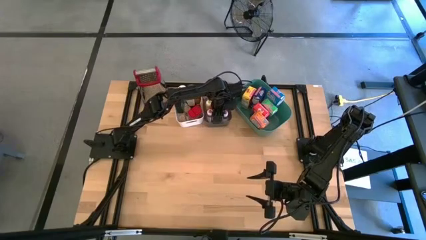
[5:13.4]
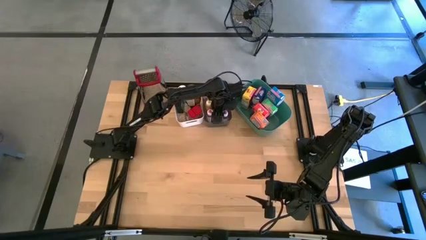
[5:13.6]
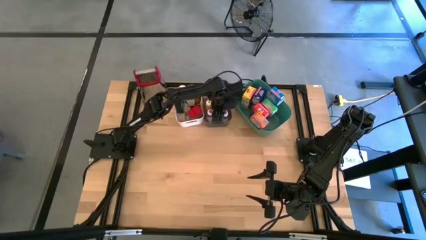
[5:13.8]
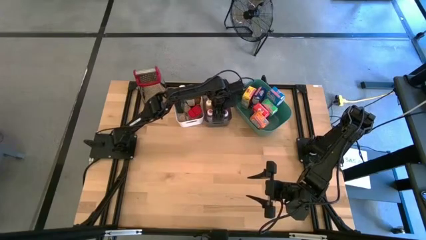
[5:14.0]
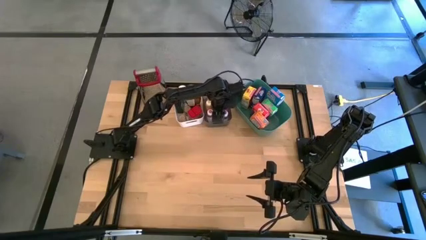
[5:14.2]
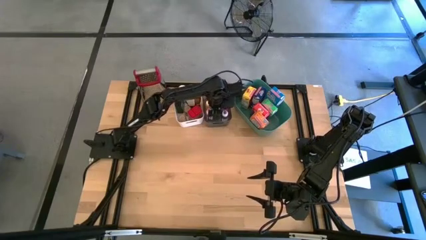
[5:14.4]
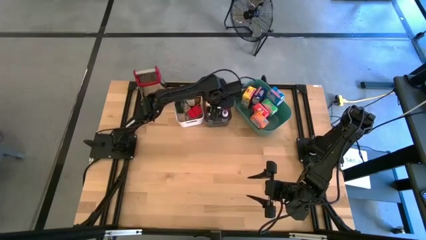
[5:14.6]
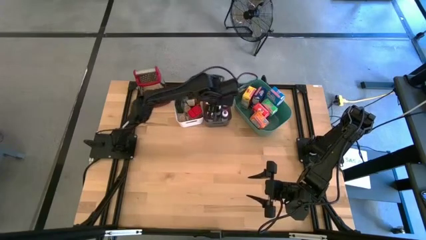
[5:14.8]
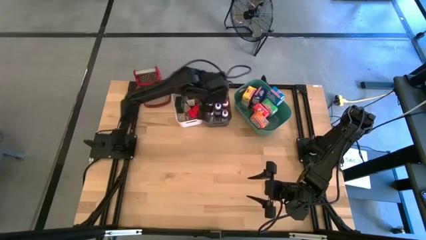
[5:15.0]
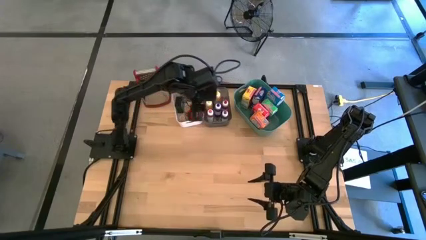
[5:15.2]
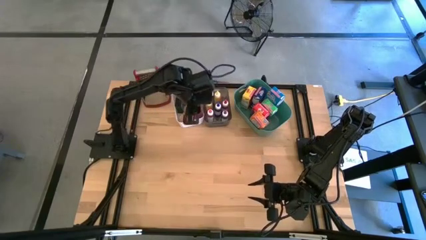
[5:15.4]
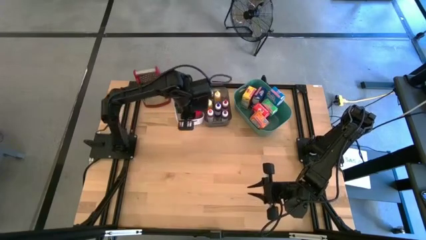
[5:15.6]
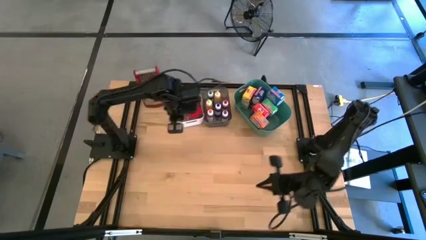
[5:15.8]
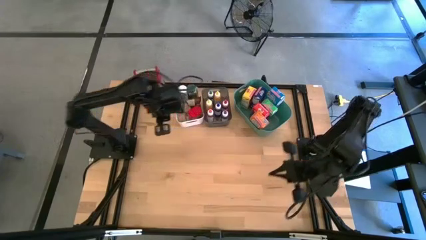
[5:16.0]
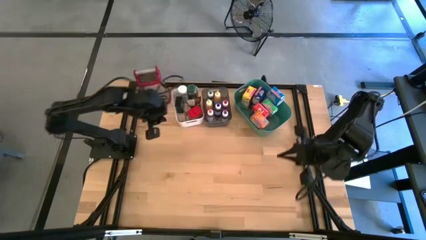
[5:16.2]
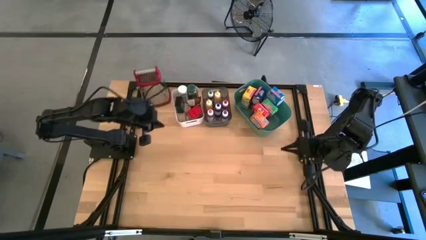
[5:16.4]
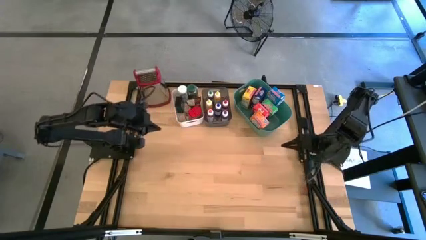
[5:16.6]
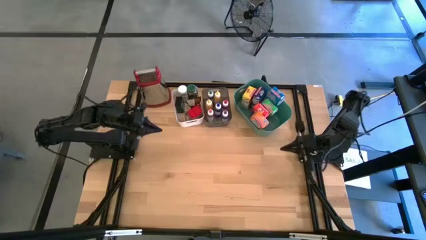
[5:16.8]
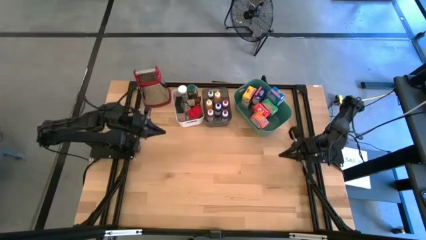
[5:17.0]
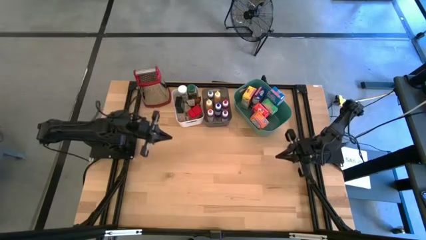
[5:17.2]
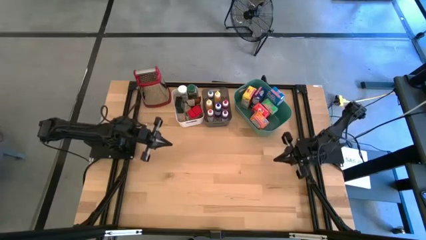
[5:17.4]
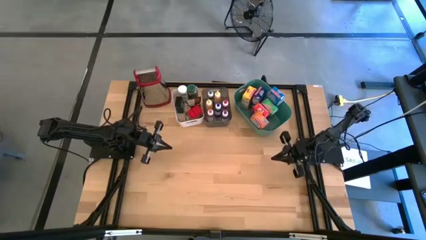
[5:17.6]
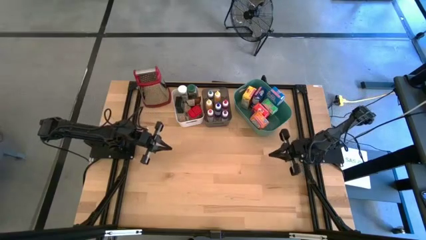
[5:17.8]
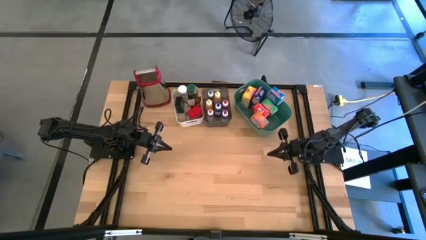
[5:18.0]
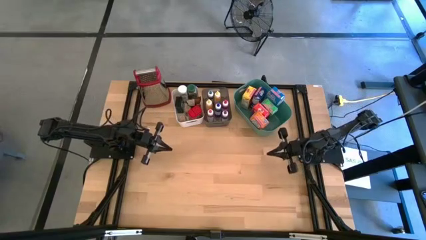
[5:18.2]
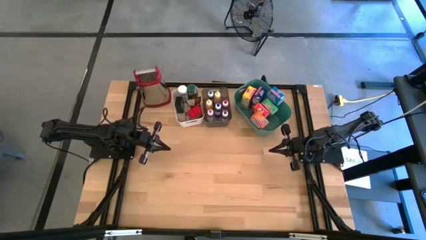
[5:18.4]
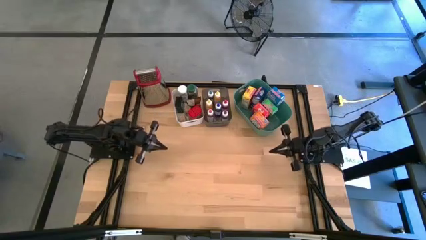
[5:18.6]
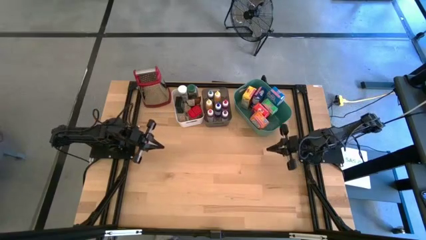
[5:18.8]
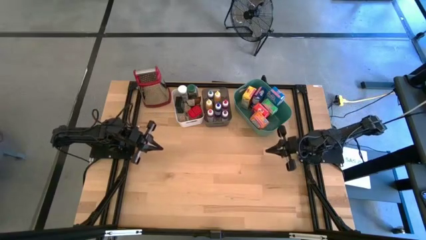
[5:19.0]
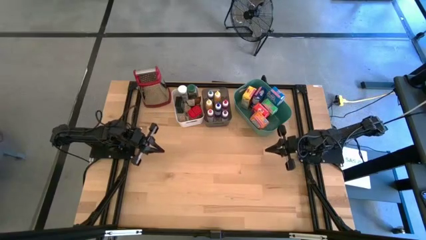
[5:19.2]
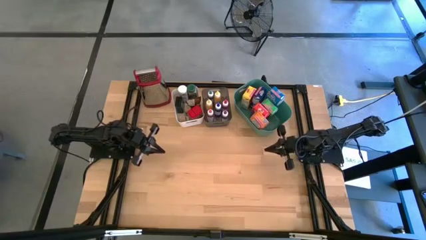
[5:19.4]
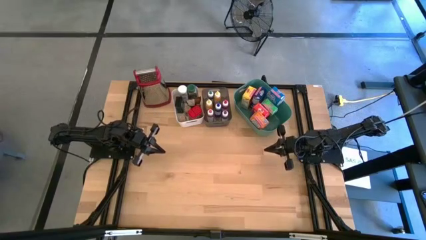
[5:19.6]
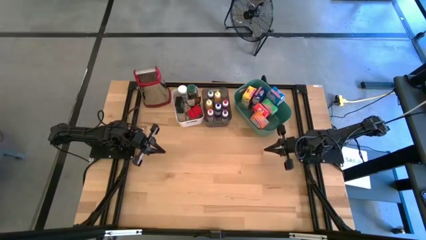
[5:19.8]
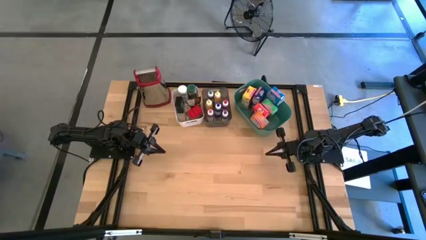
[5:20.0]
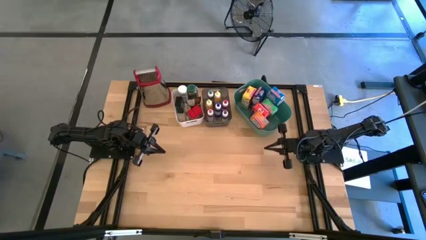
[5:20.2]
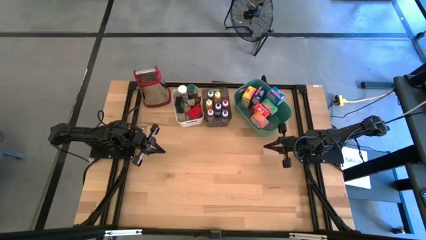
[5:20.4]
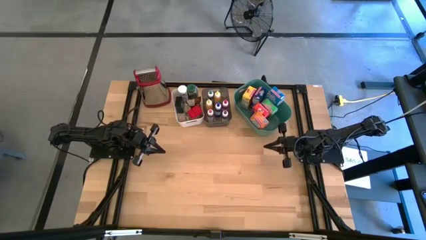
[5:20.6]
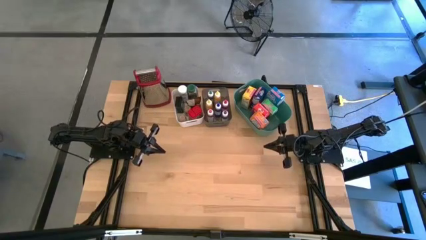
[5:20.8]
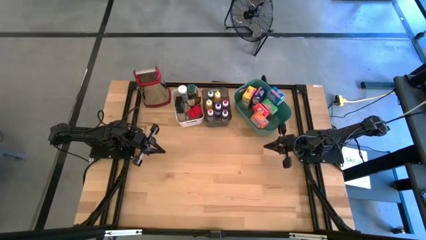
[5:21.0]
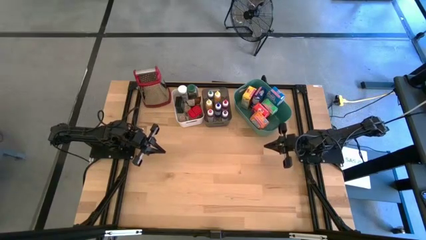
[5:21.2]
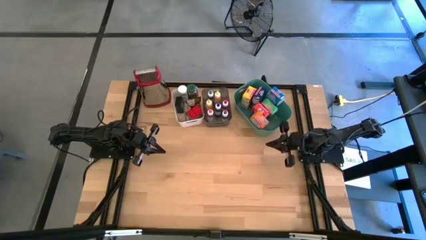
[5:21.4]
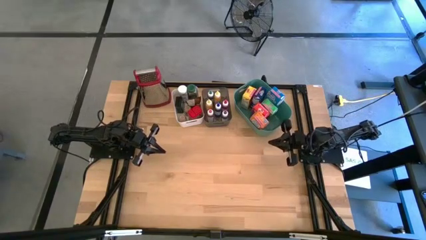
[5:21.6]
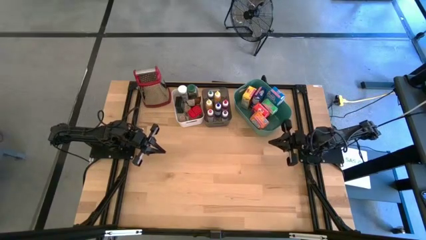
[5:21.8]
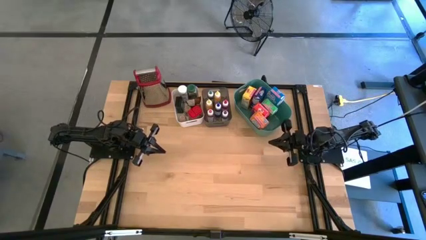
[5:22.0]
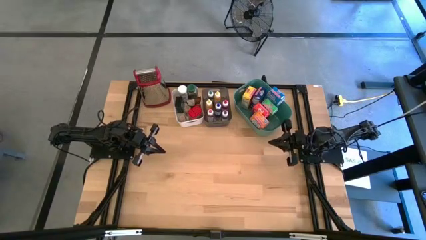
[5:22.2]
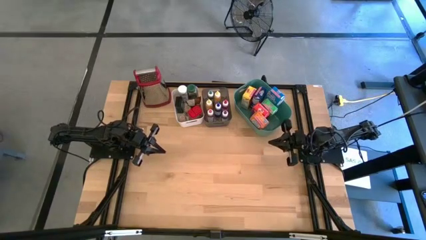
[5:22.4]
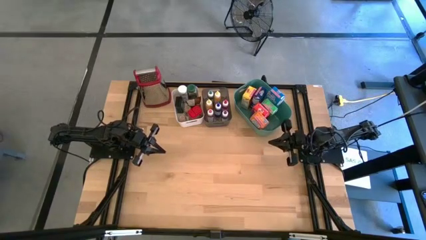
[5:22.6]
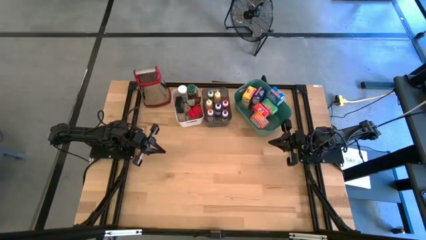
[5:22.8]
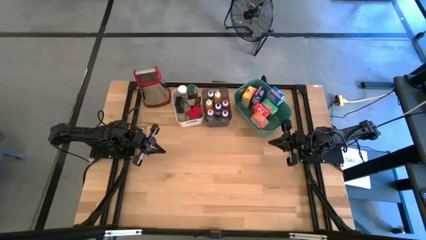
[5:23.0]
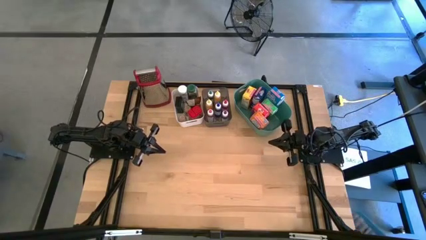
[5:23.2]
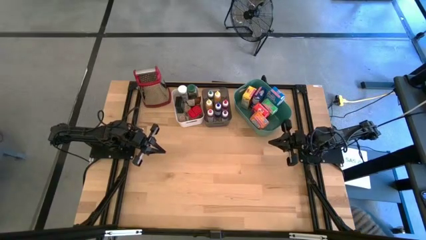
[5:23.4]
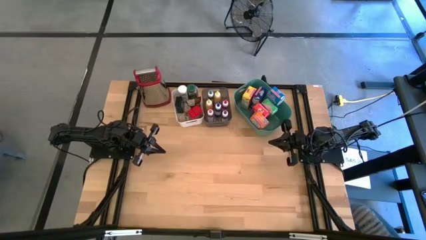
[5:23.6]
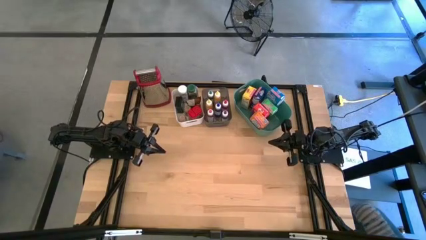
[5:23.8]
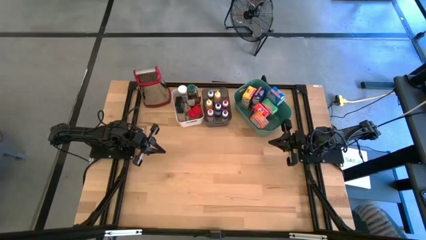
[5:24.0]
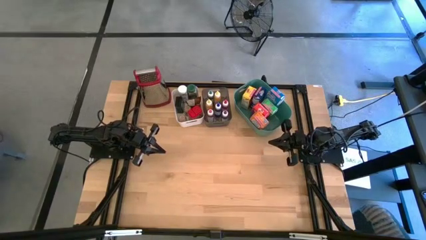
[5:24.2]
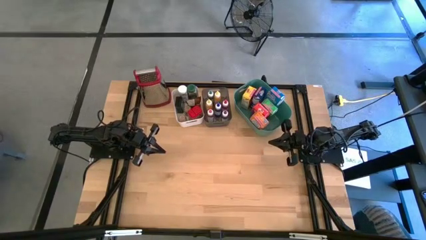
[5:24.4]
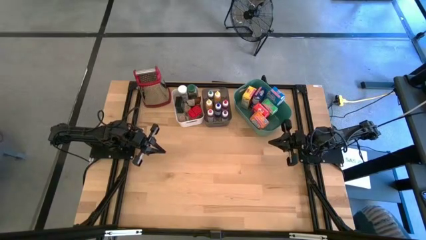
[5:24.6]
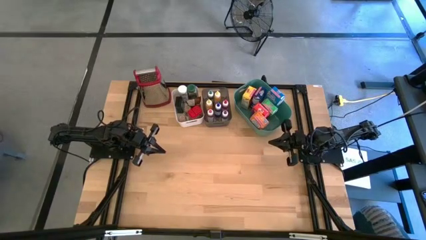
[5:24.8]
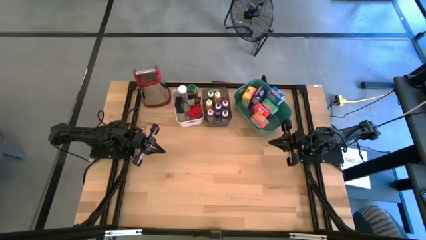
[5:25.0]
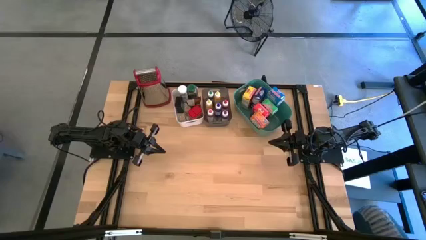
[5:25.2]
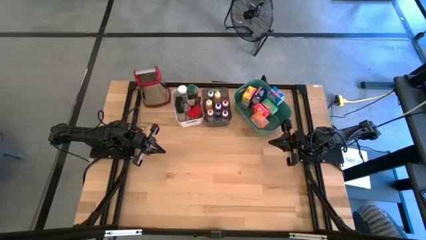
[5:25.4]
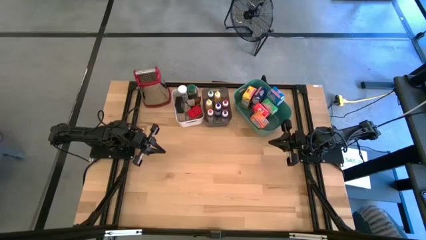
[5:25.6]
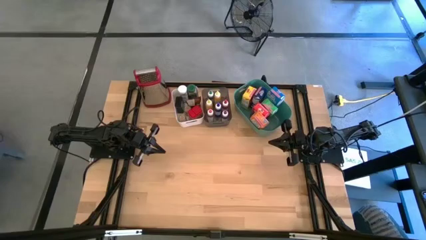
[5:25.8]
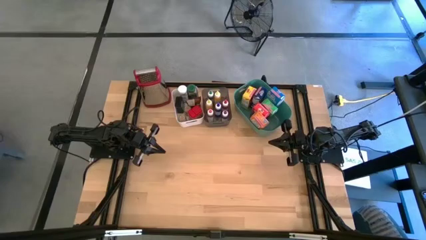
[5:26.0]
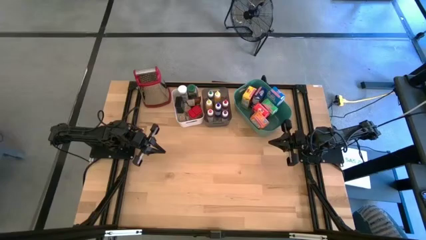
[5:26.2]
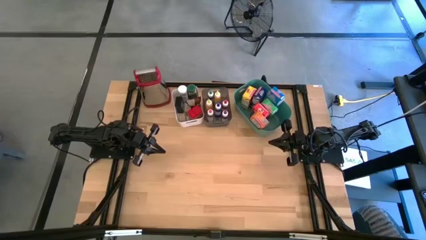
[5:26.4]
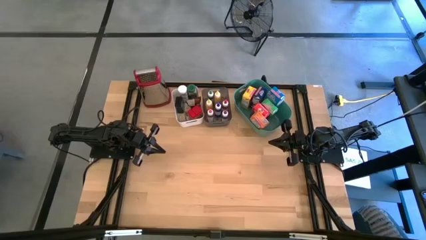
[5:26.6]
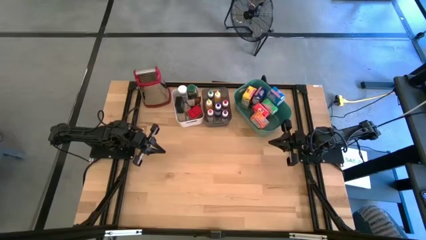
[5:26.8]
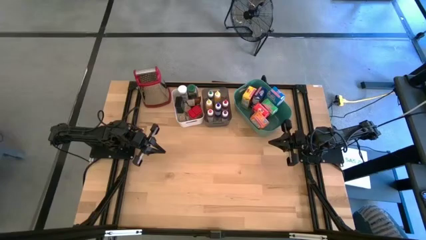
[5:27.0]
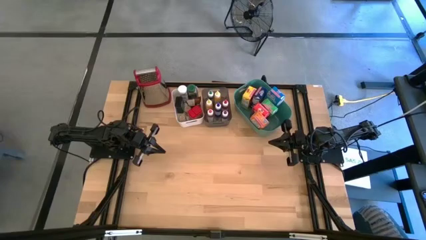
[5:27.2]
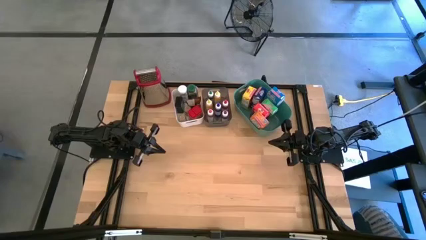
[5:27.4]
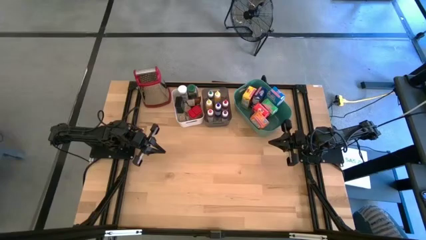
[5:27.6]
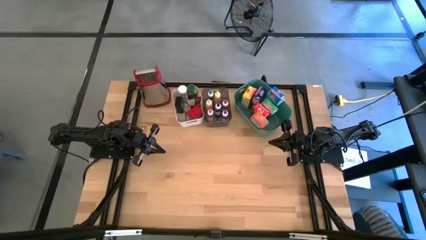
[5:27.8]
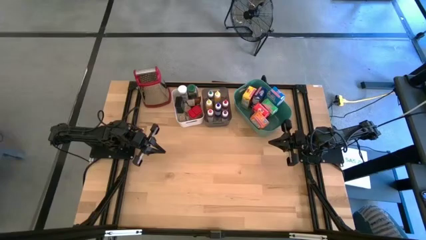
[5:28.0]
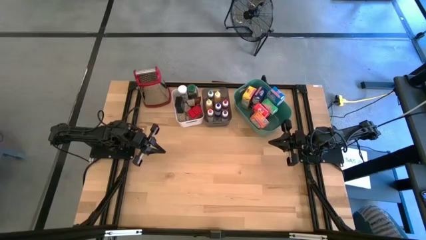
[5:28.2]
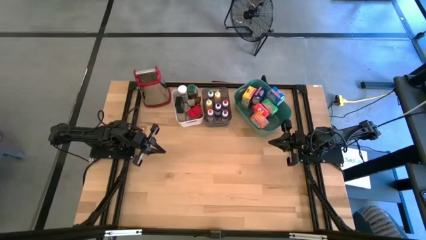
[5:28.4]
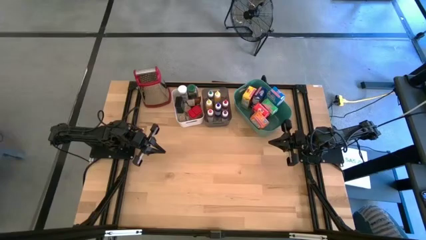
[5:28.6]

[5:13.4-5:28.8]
Task: Pick & Place Kitchen Items
Return to Home Position
